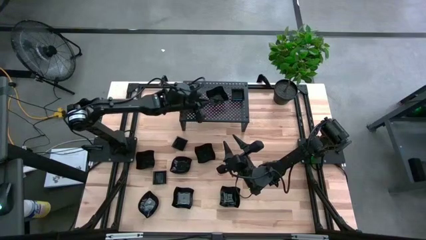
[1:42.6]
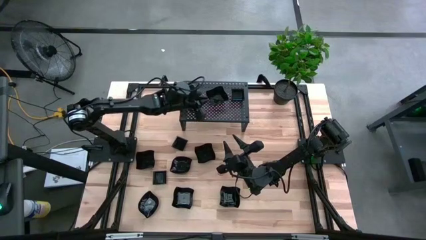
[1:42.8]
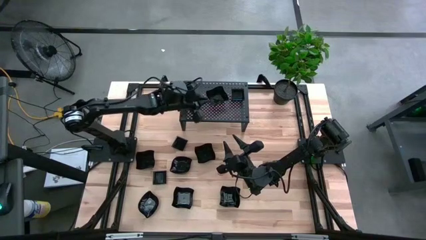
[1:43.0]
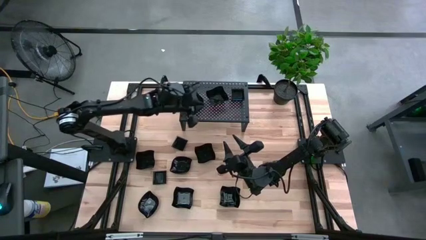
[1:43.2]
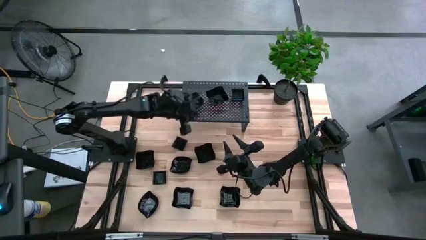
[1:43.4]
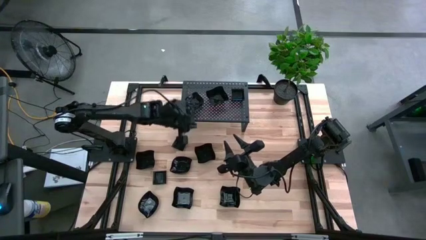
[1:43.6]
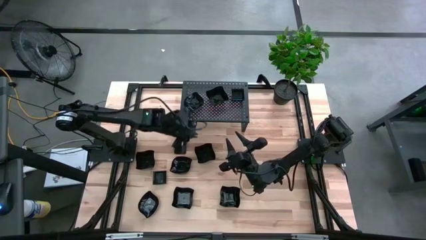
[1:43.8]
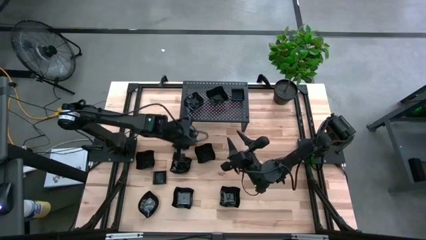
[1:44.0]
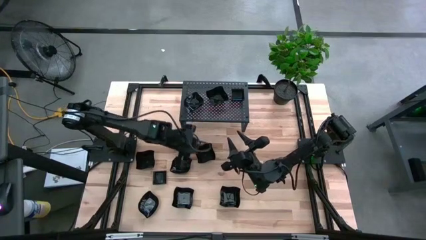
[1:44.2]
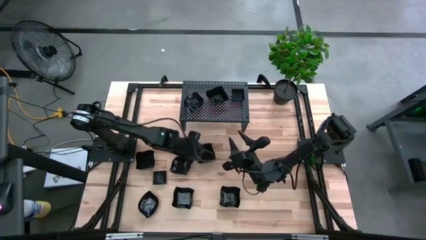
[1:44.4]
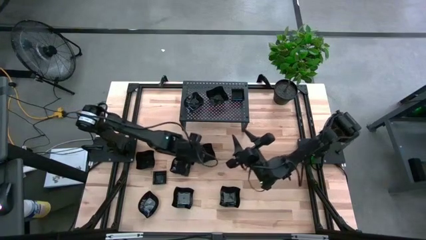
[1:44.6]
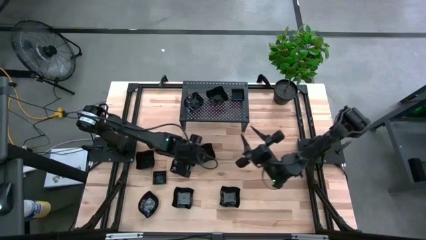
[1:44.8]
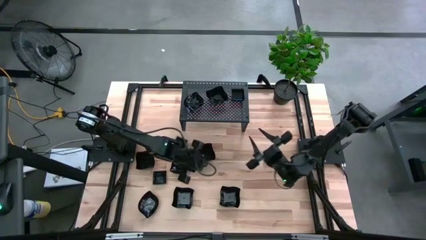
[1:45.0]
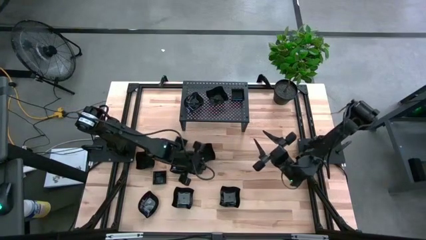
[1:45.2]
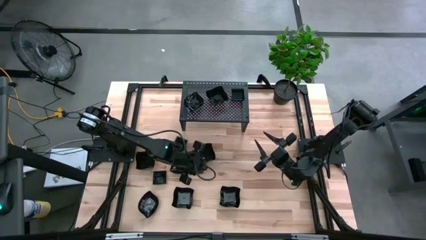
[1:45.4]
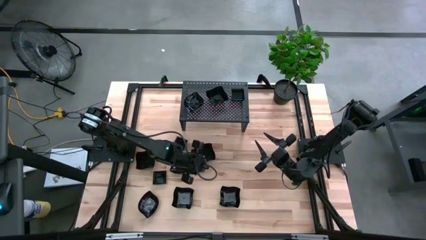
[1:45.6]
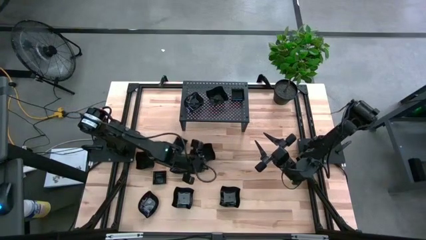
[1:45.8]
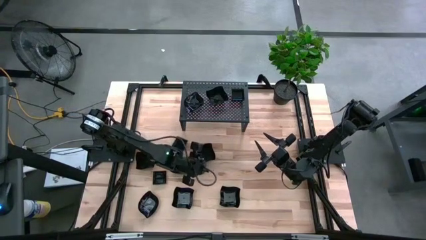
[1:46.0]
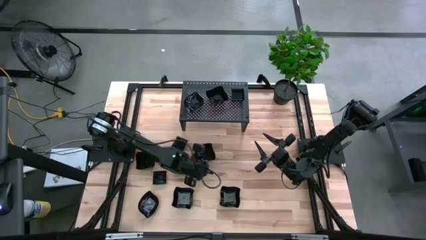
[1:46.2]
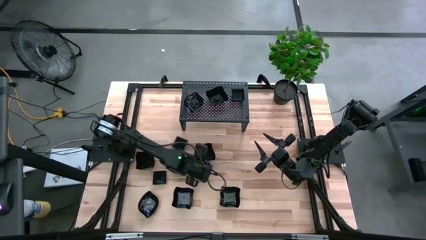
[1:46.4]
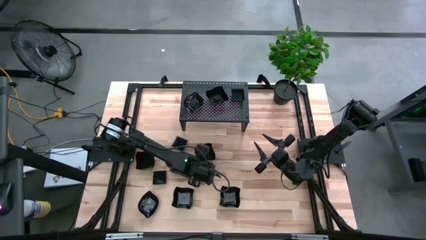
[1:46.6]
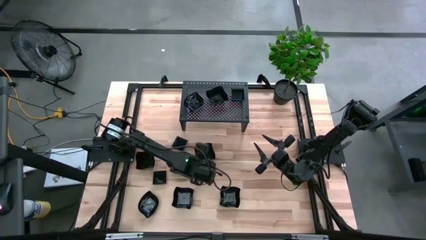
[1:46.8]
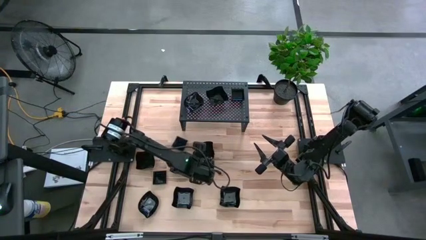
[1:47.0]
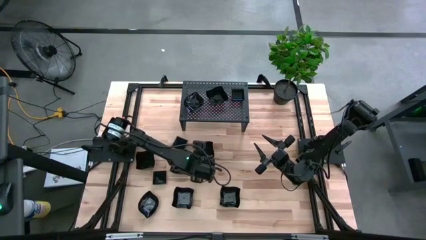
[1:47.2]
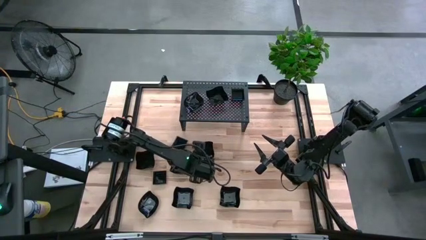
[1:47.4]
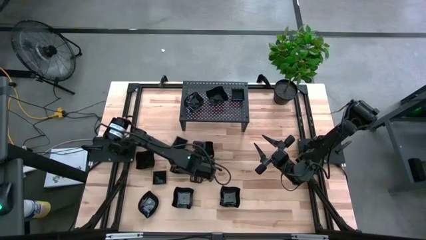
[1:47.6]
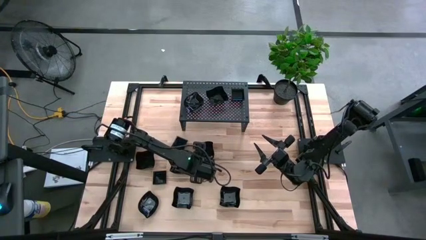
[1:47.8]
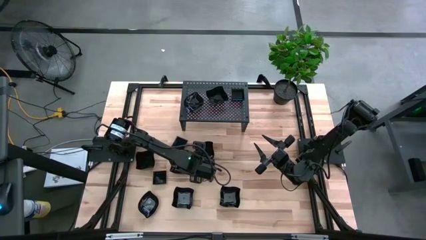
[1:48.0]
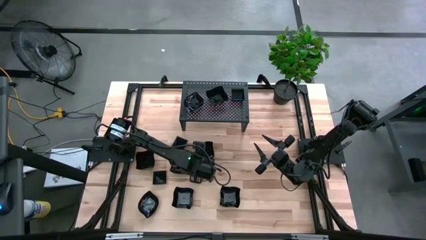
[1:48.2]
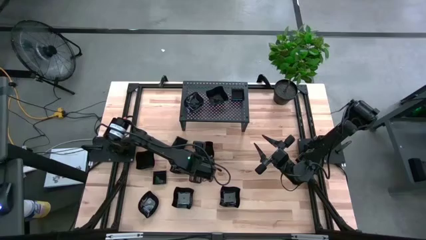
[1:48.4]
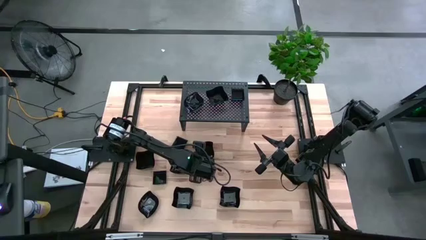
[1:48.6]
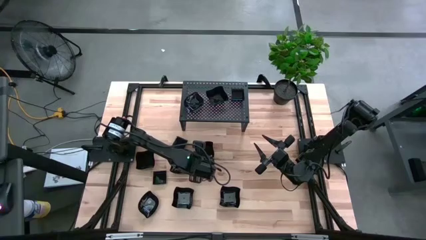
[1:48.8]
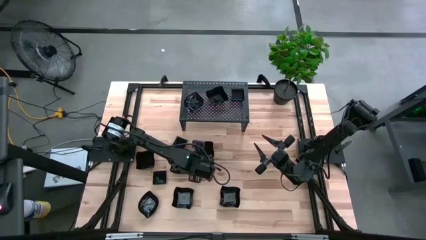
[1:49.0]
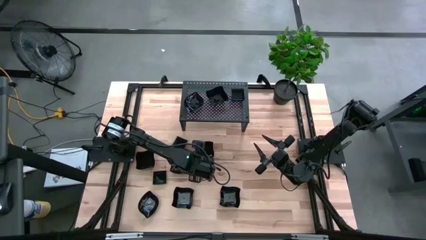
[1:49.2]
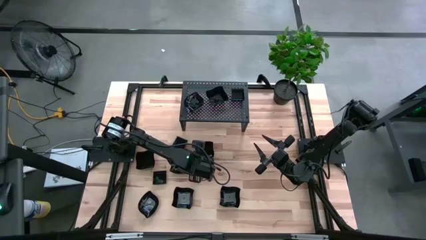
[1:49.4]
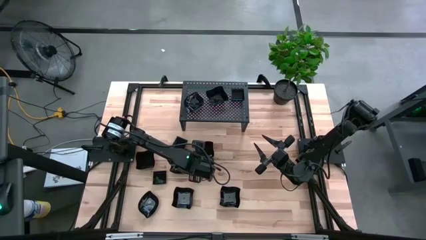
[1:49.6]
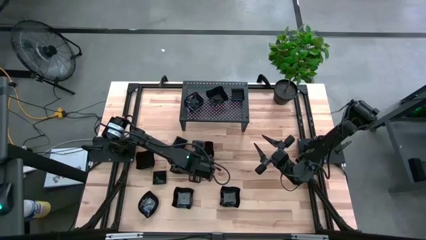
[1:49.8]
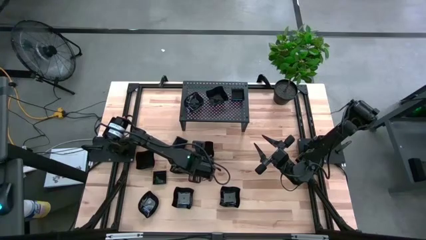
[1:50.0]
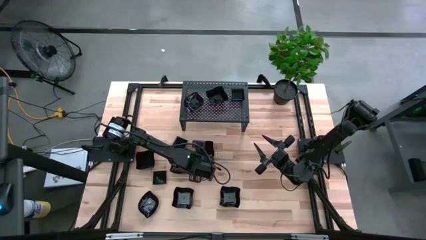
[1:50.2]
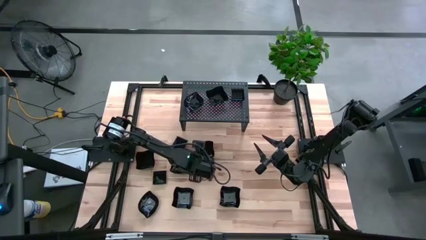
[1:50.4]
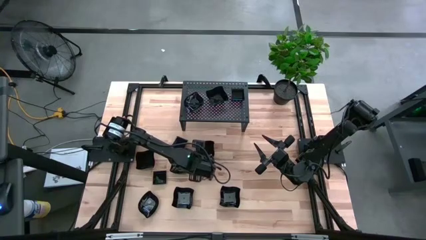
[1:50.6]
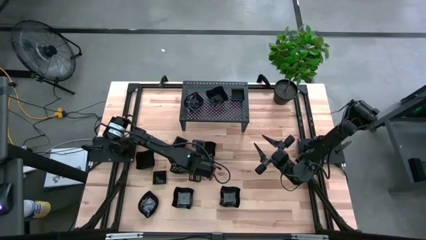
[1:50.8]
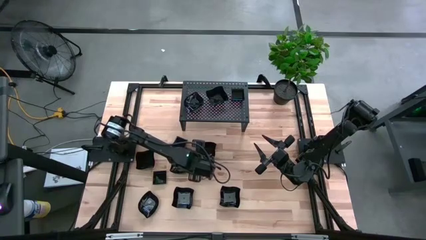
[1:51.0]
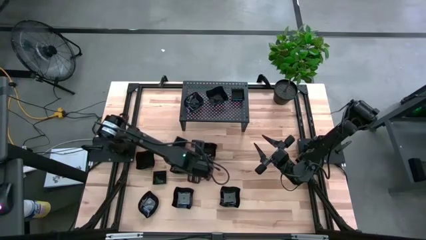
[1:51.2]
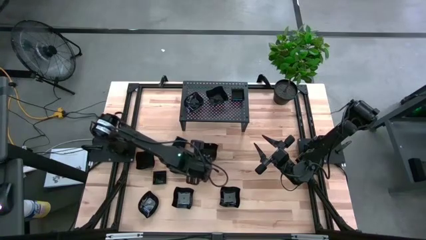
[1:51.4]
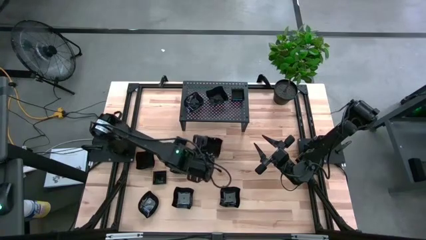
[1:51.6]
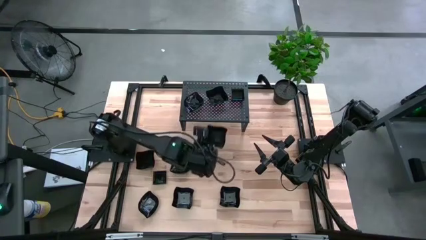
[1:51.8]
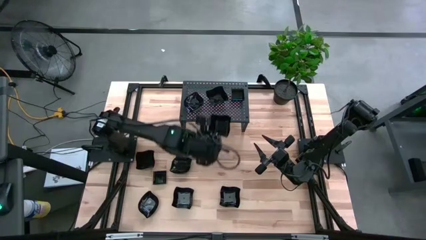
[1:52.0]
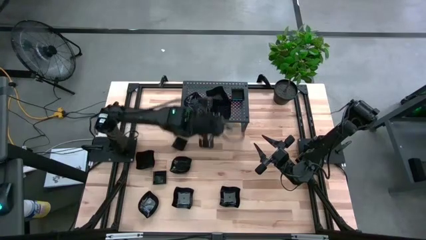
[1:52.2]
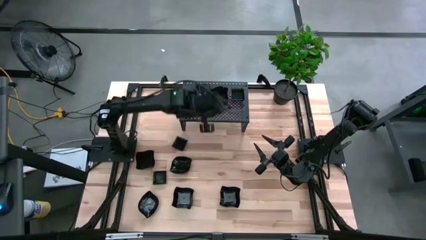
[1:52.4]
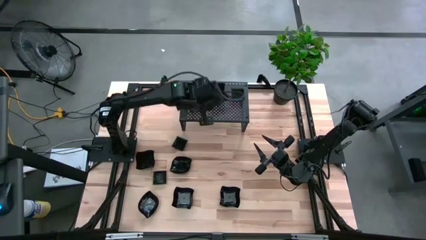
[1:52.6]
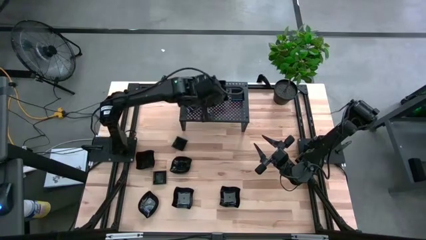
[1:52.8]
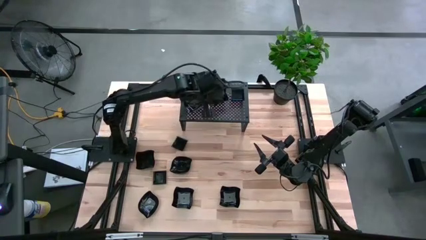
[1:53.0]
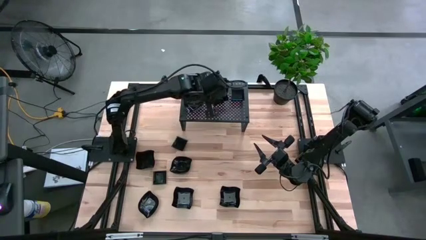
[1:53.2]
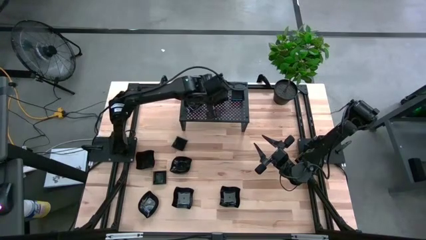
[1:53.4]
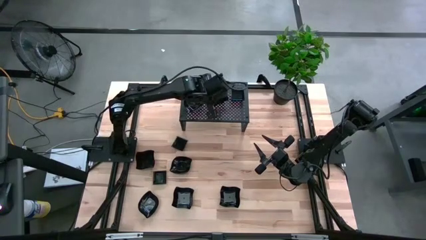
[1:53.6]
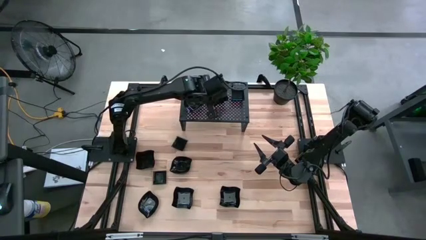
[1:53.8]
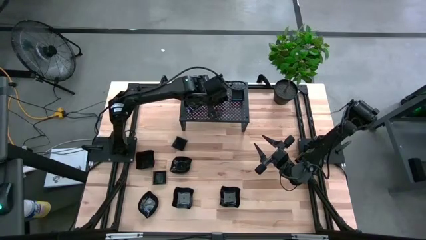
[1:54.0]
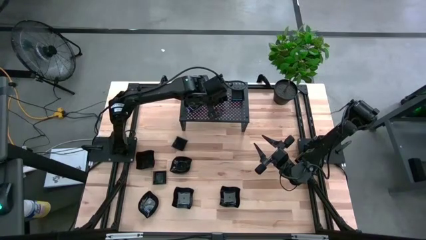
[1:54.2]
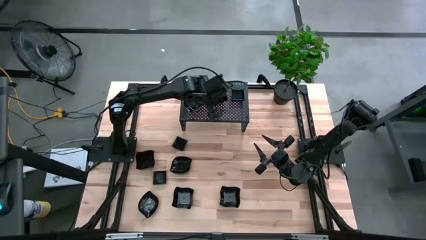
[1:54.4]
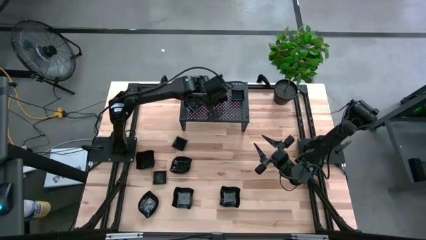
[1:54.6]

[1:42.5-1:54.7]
Task: Pick & Place Mini shaped plates
Stack the distorted square plate on top of the distorted square plate on the shelf
